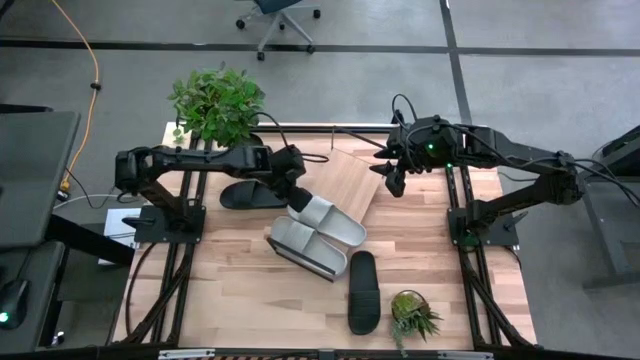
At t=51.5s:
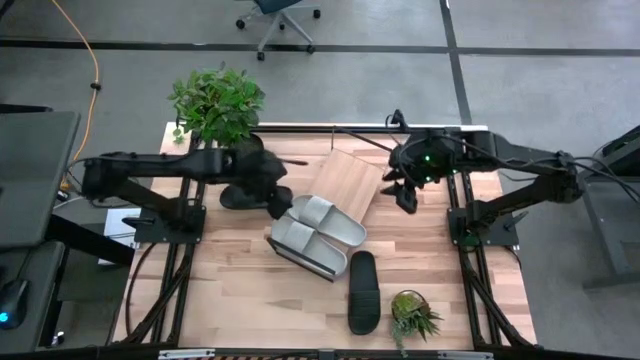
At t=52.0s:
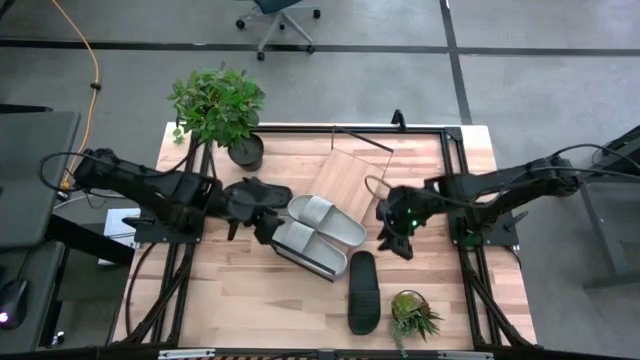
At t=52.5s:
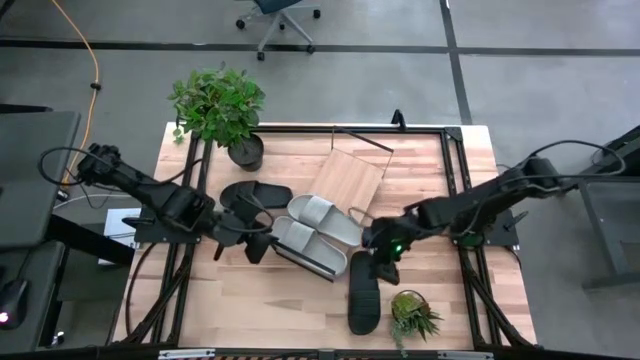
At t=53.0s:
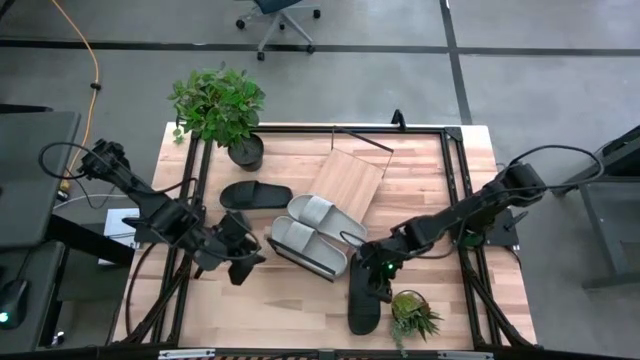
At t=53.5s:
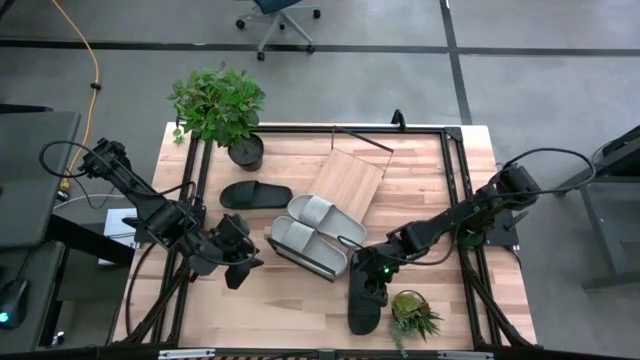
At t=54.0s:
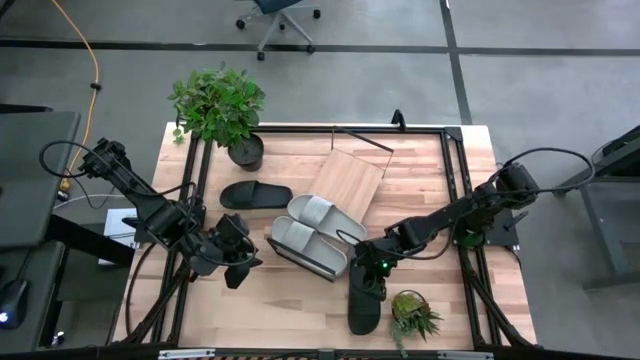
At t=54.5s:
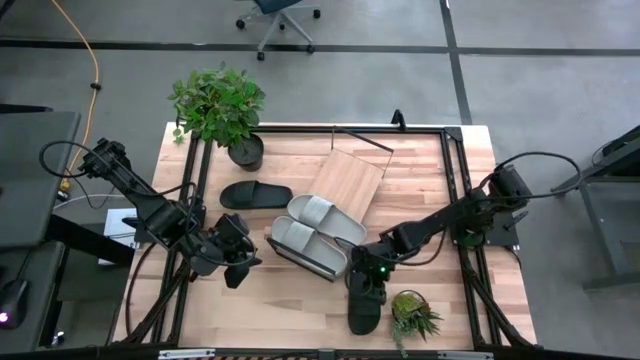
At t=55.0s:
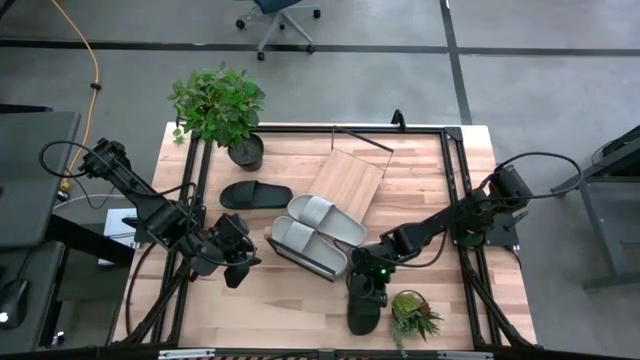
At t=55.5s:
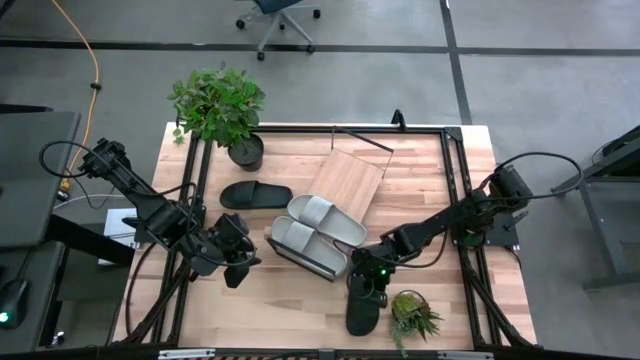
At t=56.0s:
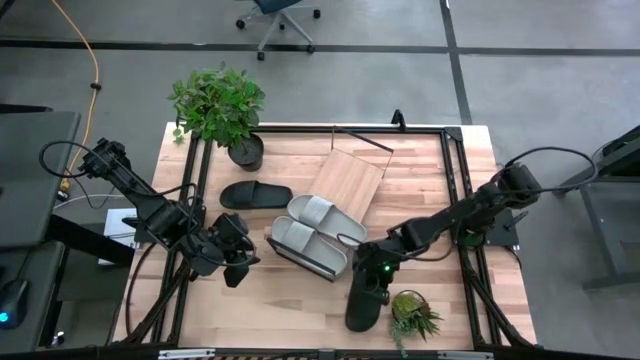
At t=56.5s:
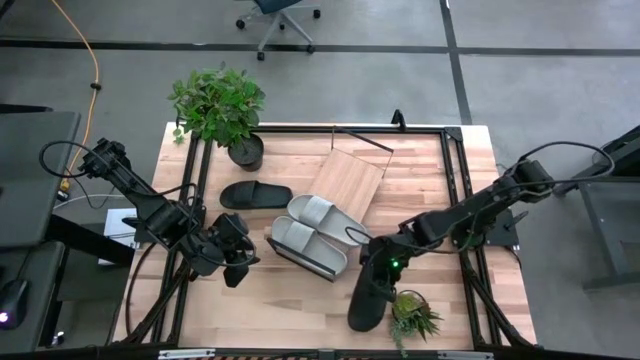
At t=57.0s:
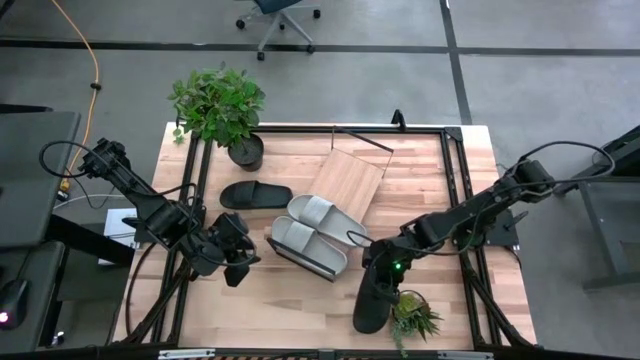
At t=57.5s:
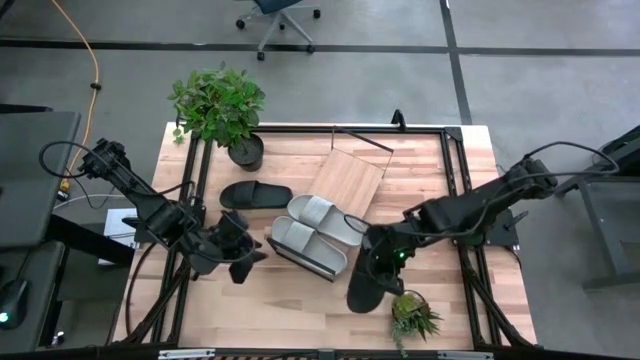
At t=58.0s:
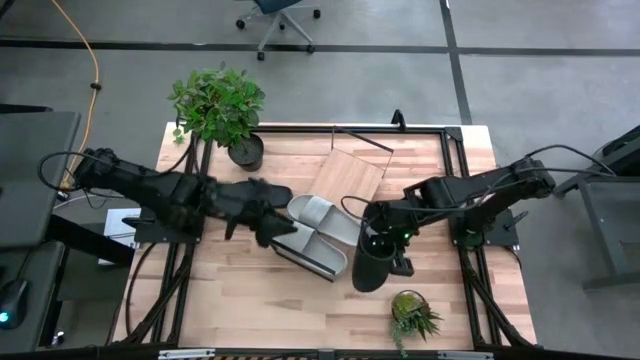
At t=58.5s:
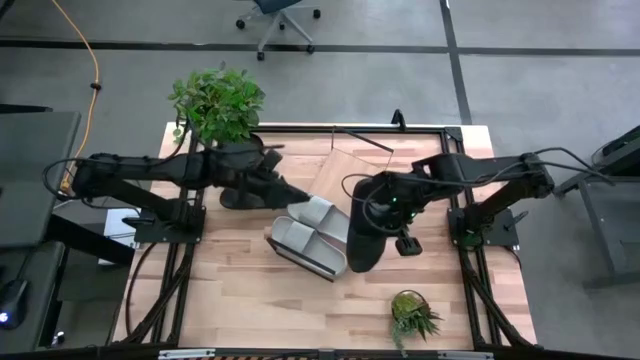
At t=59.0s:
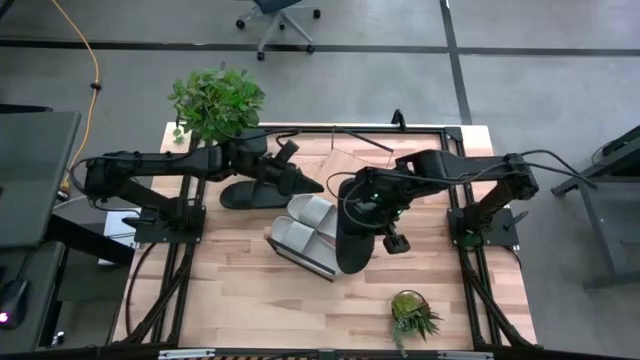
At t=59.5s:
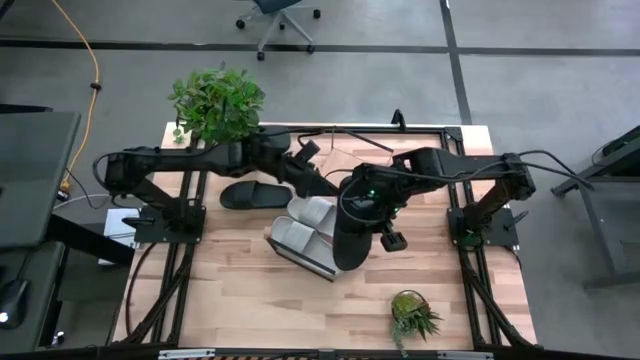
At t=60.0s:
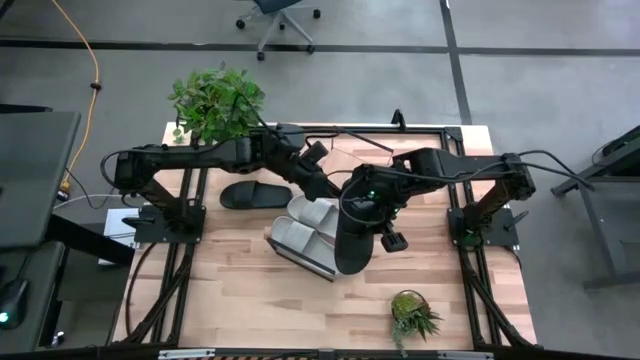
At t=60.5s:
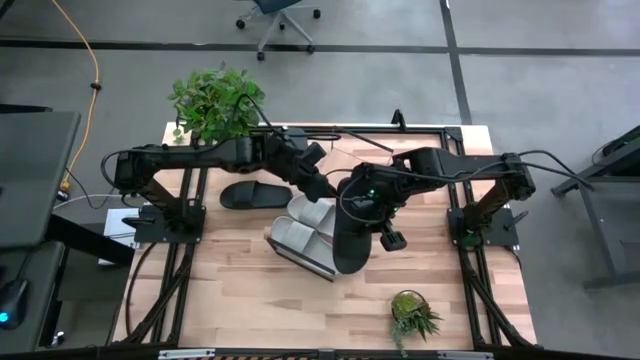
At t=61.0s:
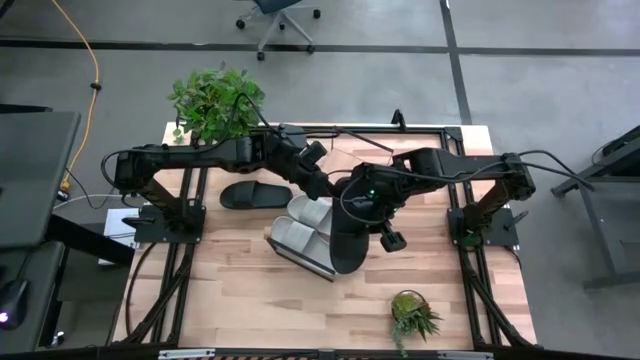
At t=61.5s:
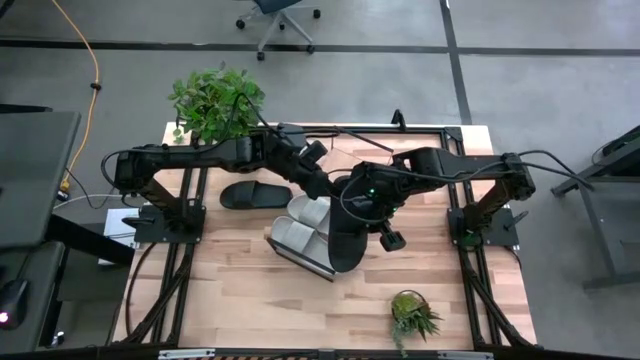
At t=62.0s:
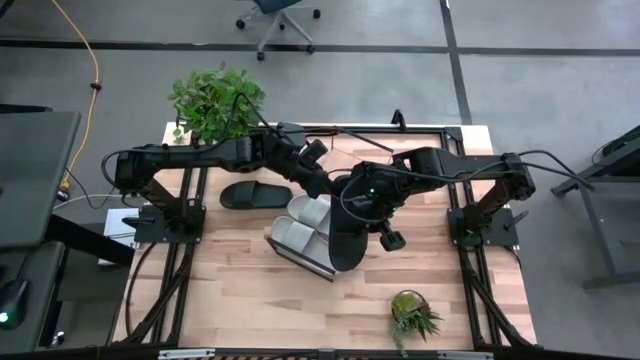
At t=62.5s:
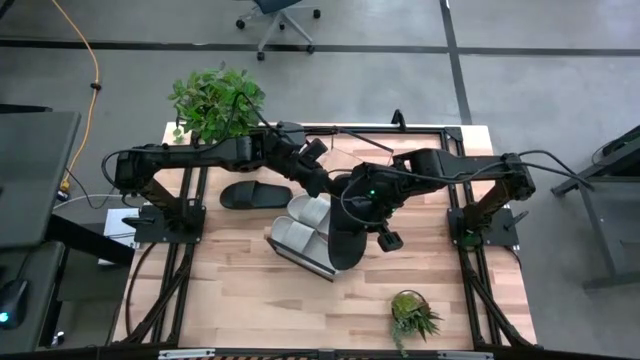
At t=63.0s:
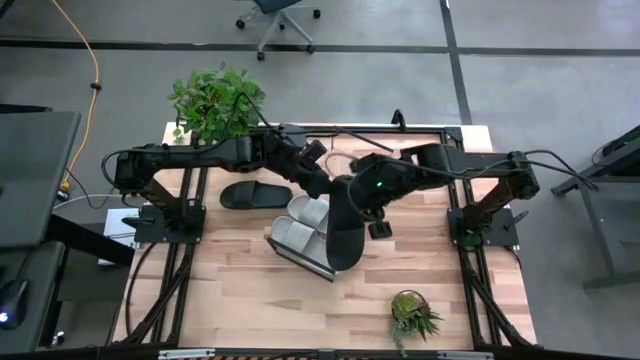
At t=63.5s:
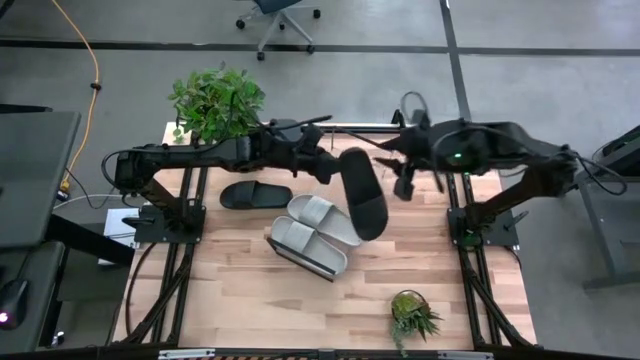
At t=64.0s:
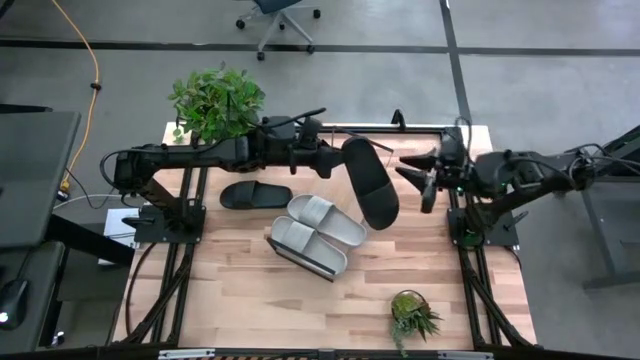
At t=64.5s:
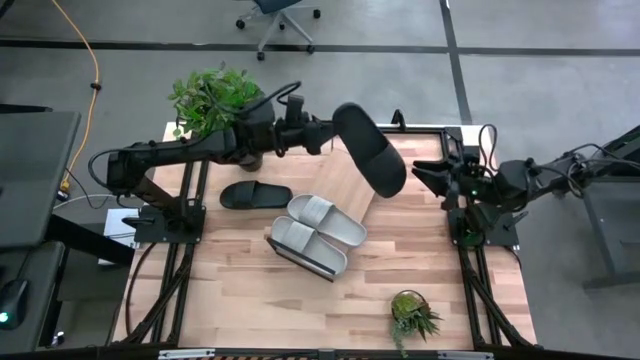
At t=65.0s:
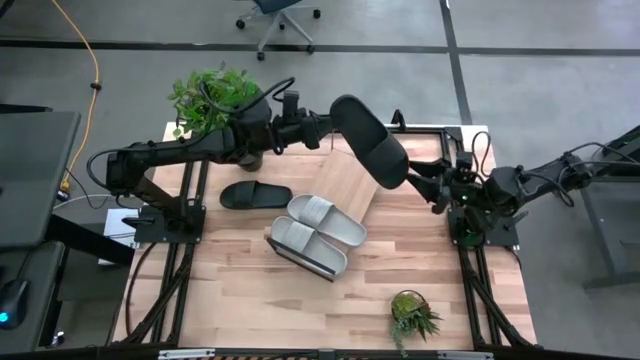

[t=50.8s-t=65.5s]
Task: Pick and place slides into the shelf
Put the bottom black slide on the shelf

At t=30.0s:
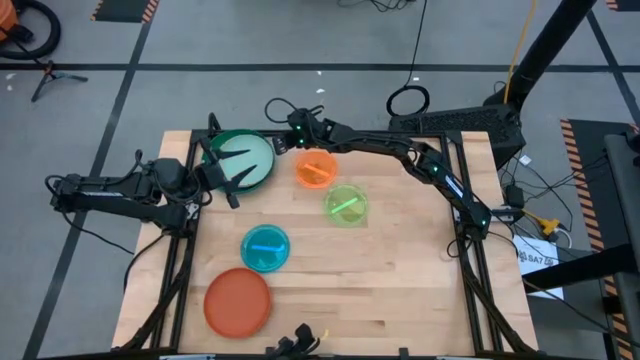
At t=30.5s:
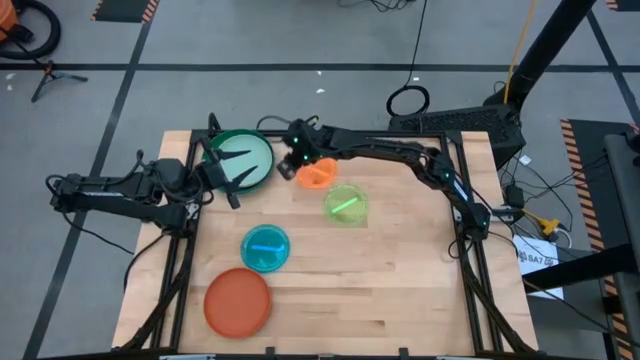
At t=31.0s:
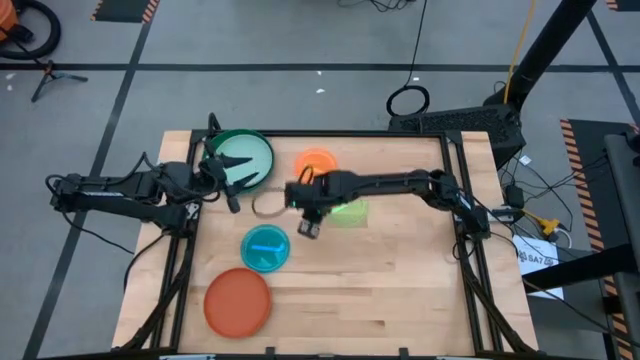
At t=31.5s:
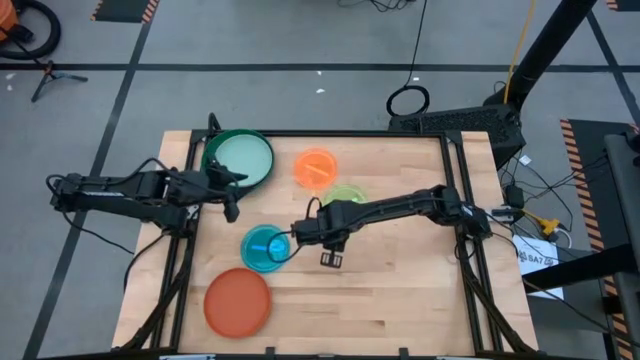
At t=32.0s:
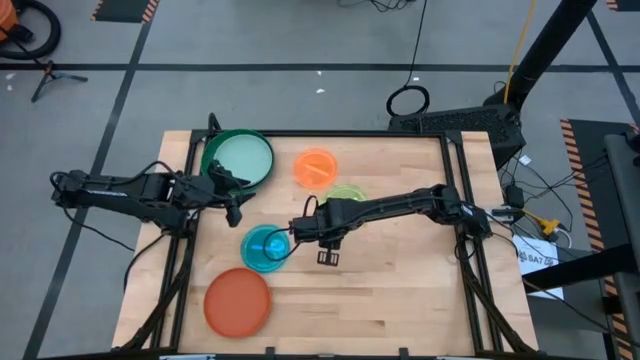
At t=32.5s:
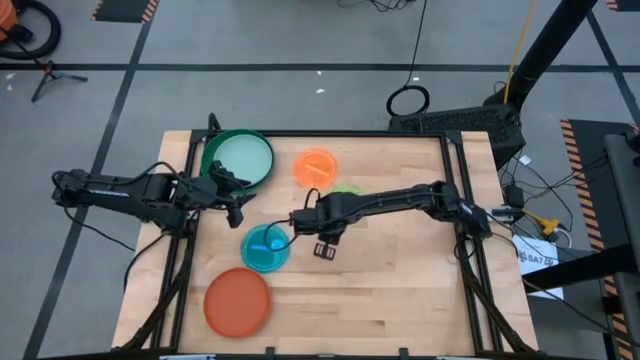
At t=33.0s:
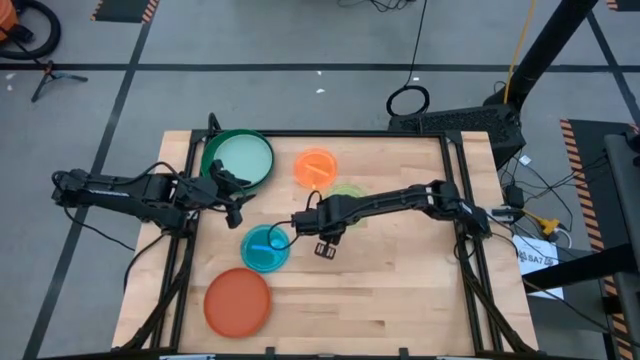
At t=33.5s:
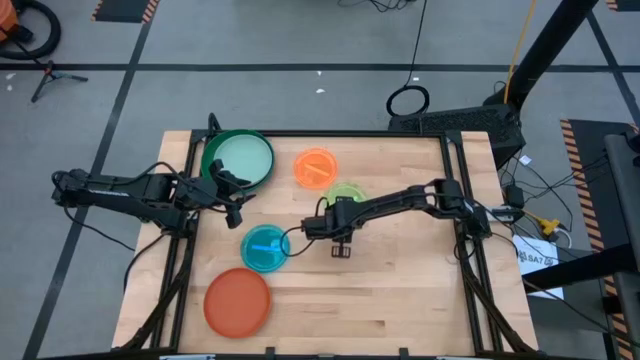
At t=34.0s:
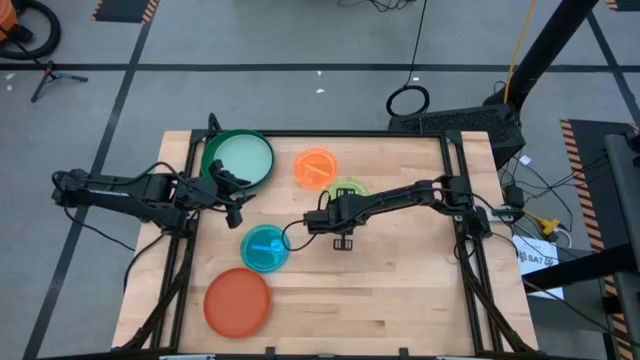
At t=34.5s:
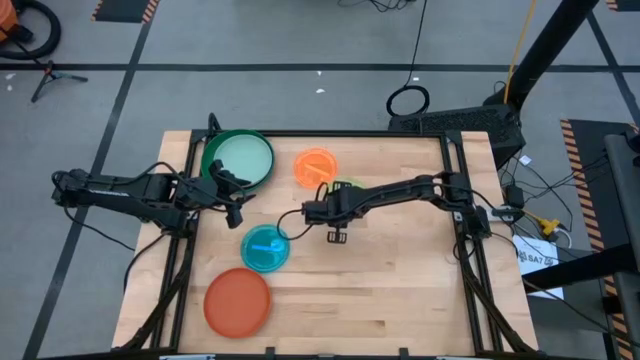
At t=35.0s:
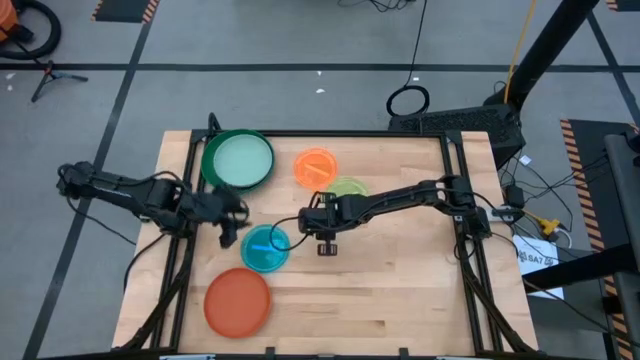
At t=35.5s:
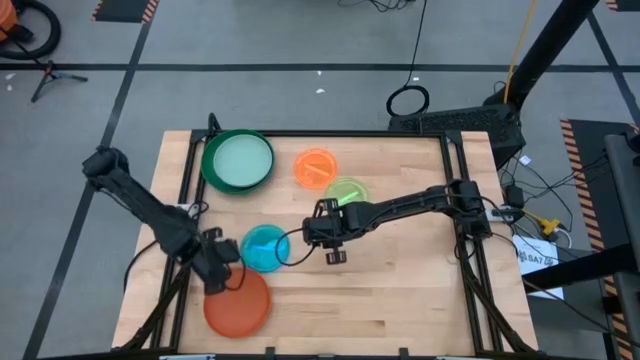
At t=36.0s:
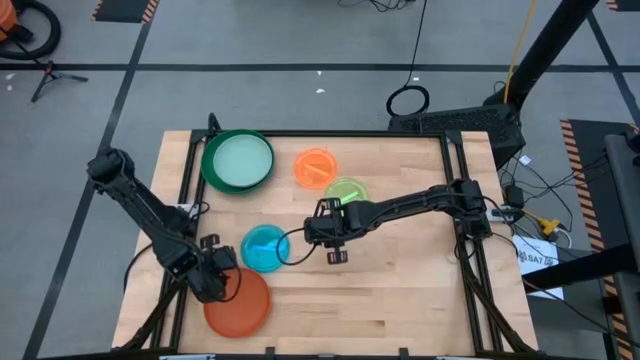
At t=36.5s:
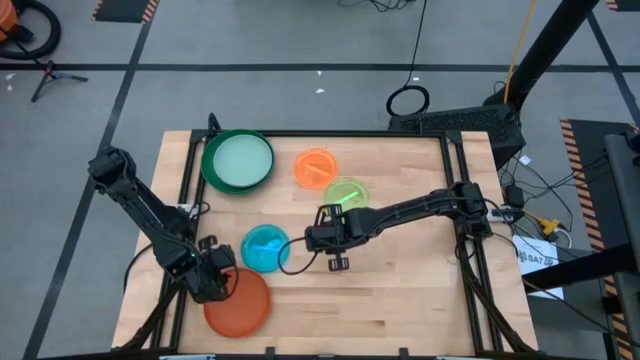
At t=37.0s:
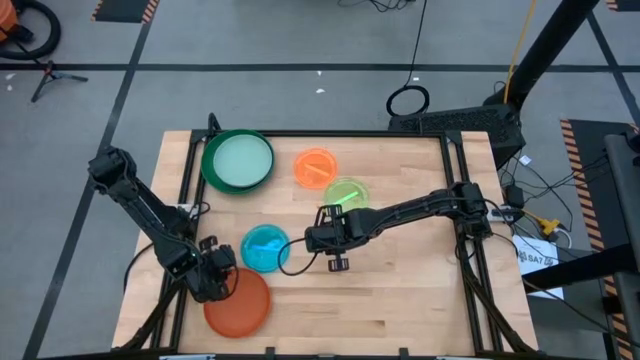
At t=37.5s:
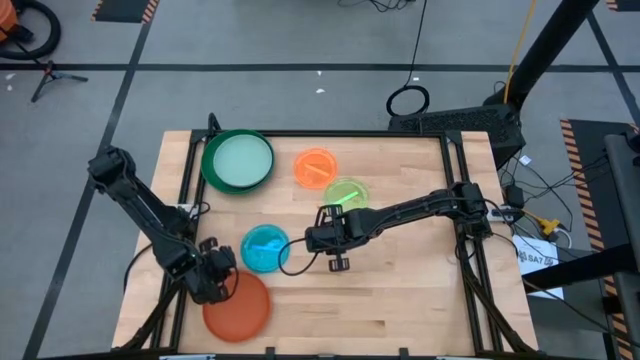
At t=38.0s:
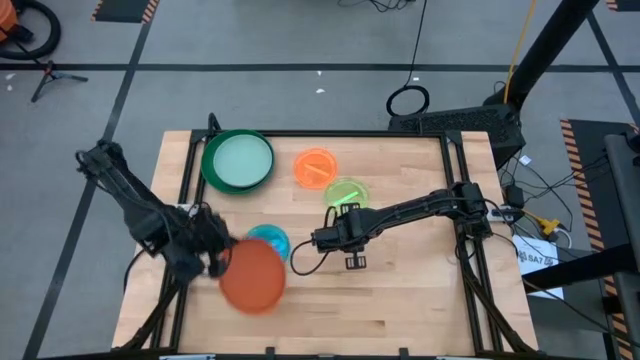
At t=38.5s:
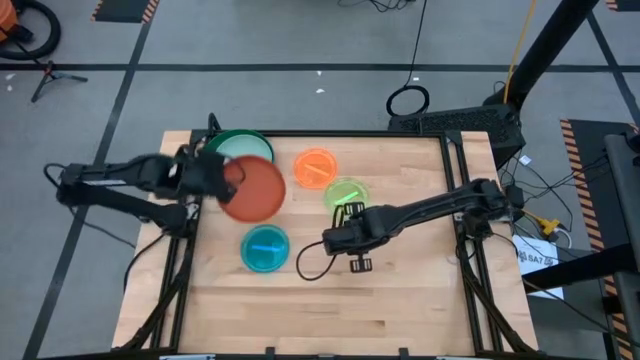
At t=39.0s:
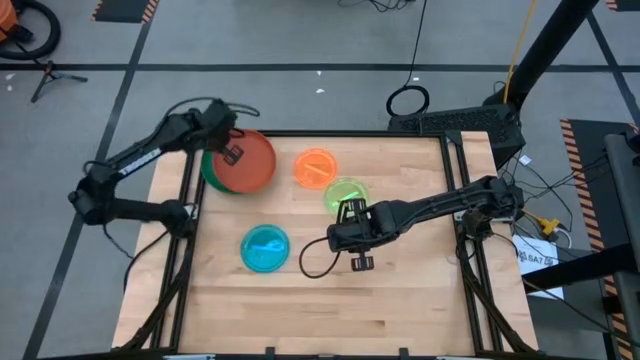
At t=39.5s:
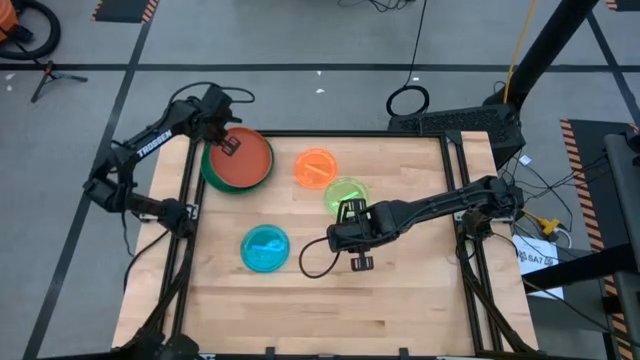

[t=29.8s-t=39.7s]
Task: Stack plastic plates
Stack the dark orange plate on top of the light blue plate
